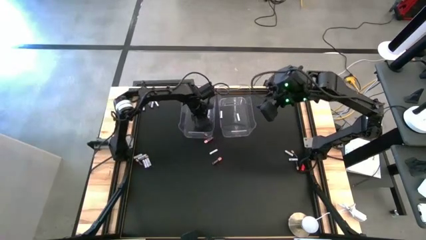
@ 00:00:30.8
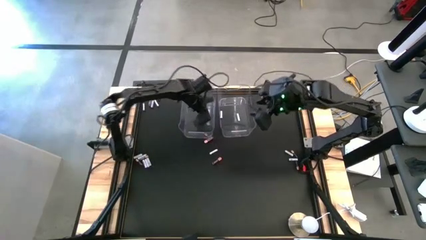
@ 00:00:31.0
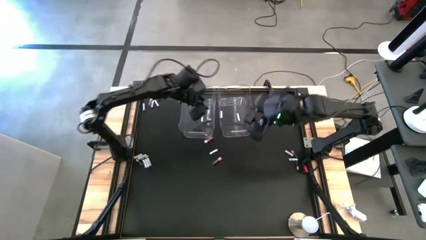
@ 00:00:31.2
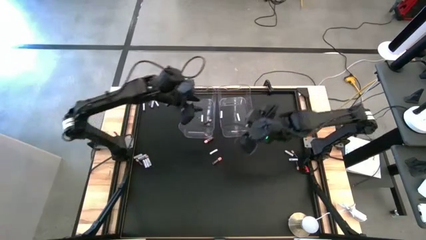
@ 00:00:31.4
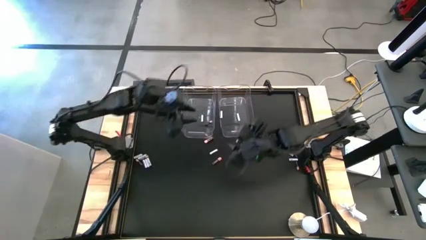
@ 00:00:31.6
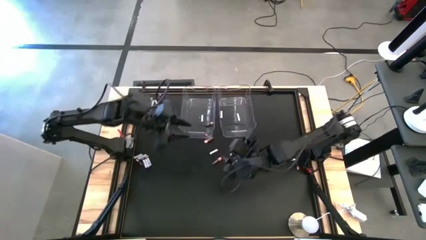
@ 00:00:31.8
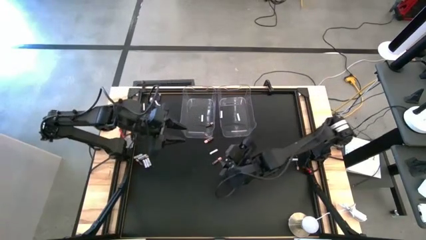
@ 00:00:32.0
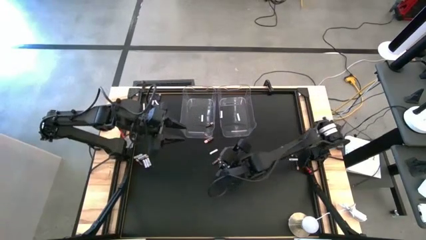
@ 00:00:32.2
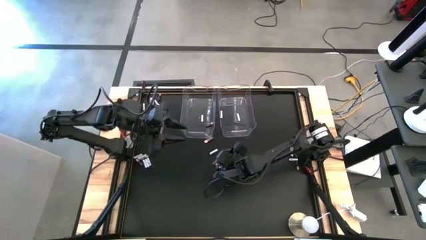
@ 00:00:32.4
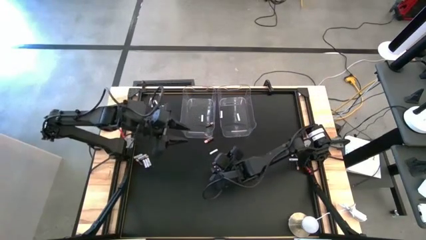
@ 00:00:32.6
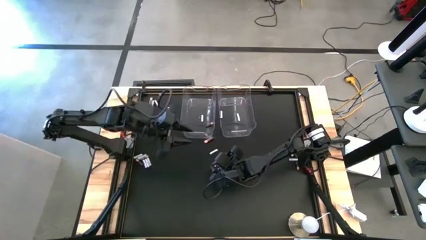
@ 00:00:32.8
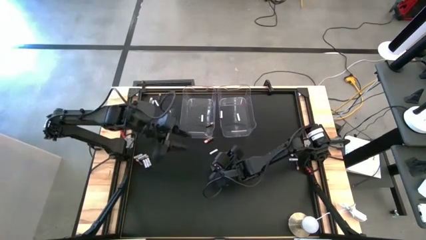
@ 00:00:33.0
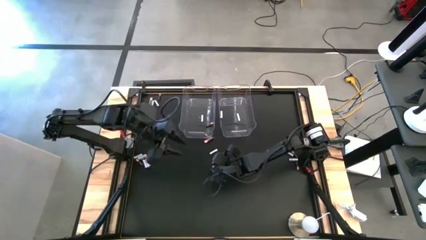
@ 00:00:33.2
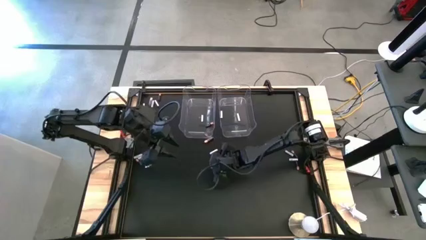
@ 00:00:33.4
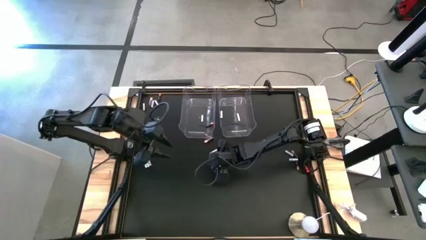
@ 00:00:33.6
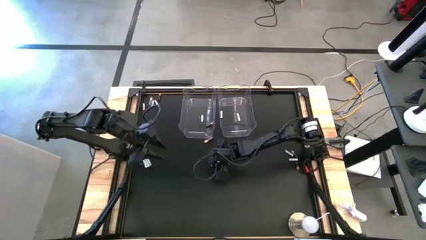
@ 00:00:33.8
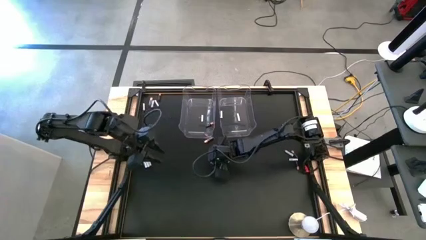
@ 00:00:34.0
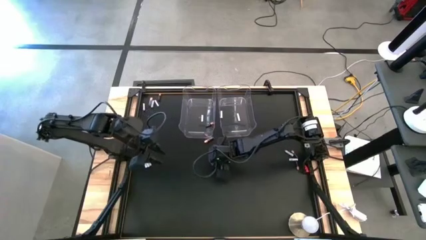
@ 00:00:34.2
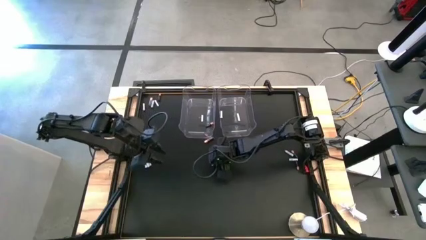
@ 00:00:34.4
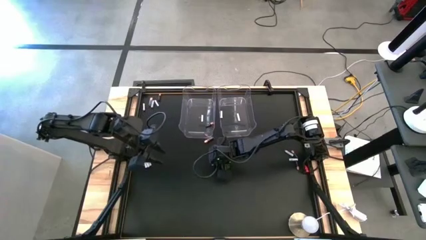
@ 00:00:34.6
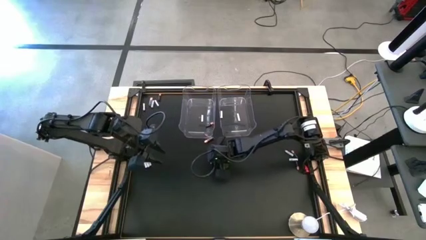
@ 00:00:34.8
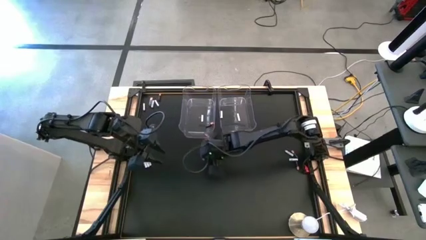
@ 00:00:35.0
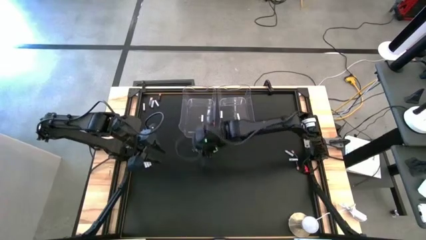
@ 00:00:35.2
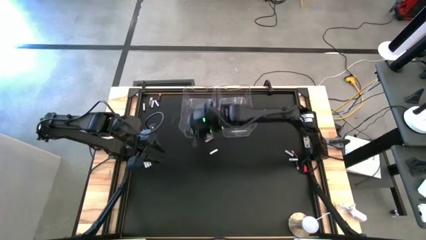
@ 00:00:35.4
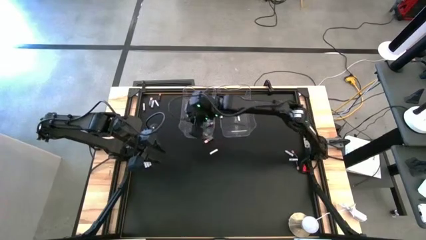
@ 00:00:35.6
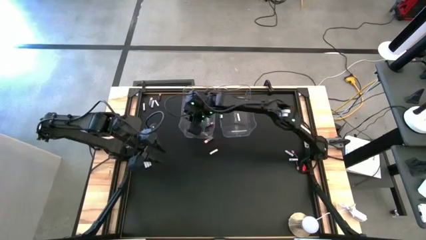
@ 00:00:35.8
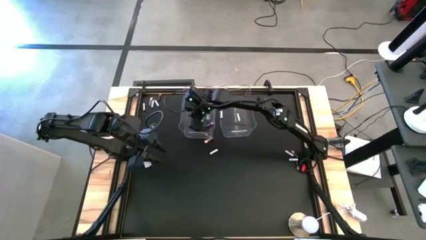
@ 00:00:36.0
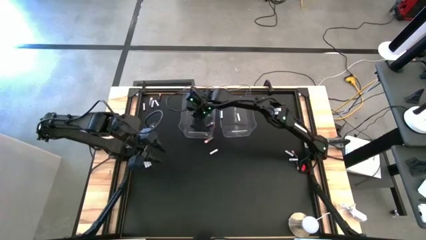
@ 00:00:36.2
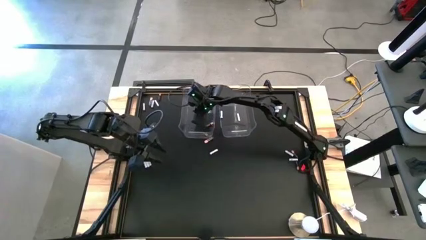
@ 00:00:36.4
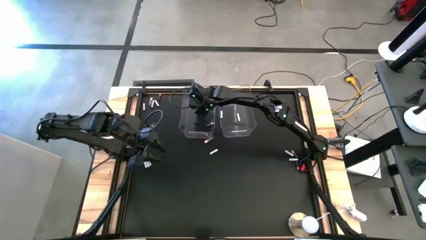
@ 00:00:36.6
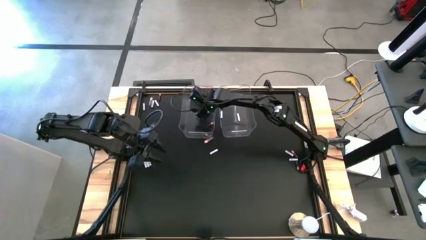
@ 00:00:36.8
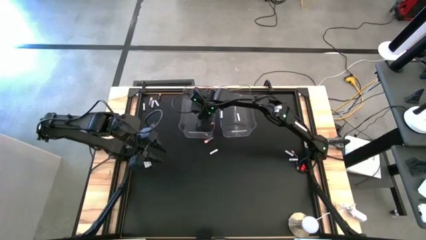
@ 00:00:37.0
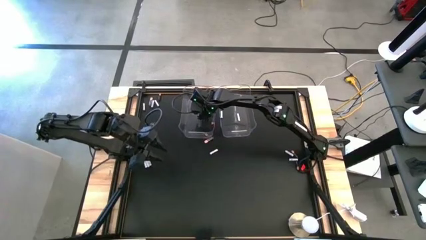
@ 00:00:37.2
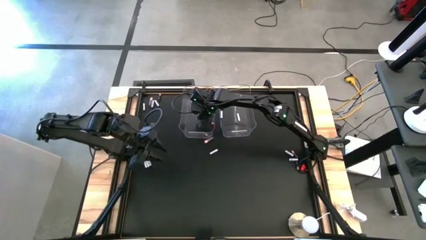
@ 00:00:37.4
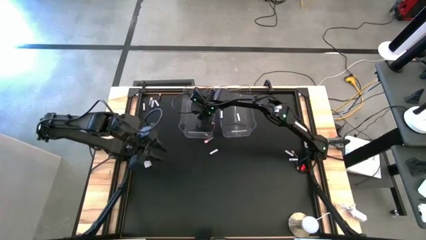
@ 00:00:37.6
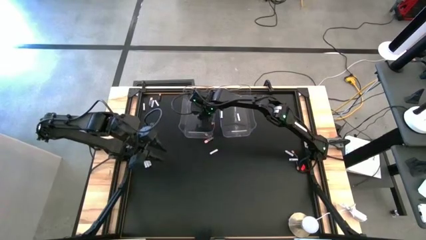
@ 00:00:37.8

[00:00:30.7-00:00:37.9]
Task: Sort batteries
Put the black battery into the left transparent bin

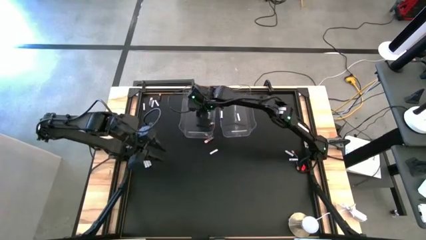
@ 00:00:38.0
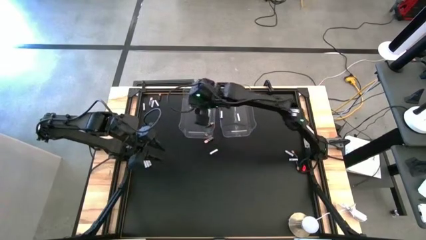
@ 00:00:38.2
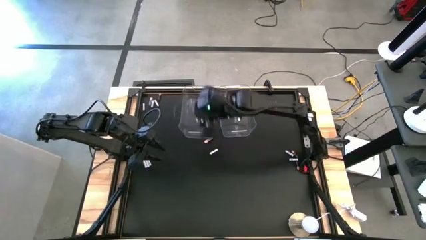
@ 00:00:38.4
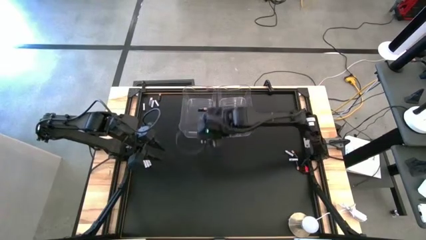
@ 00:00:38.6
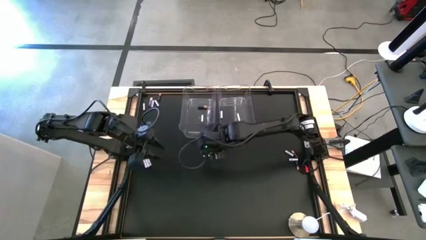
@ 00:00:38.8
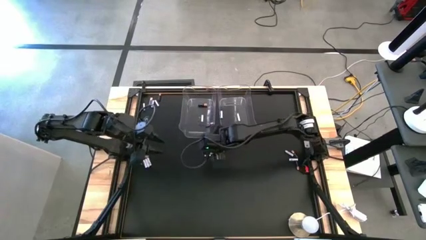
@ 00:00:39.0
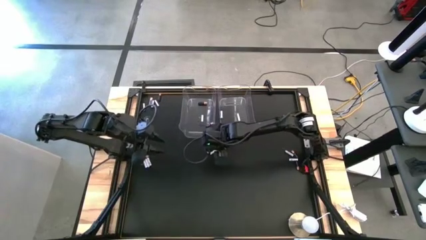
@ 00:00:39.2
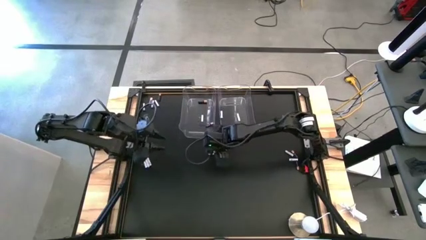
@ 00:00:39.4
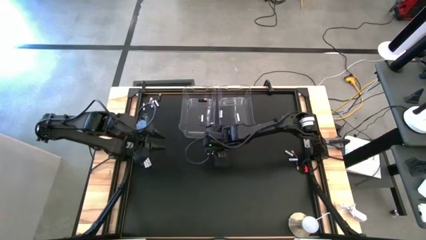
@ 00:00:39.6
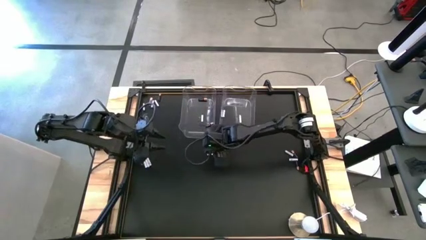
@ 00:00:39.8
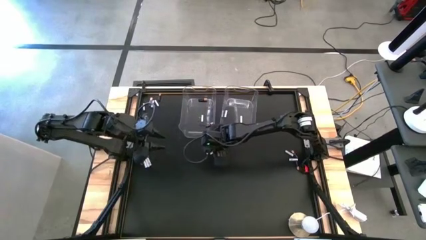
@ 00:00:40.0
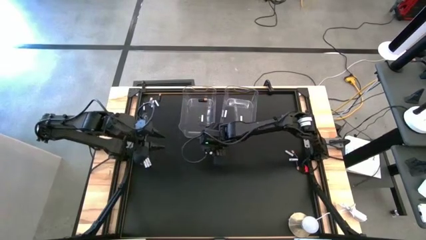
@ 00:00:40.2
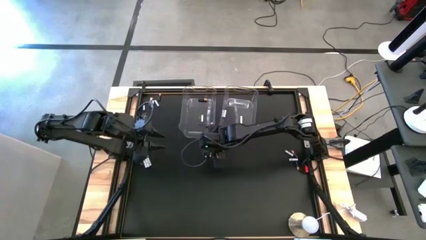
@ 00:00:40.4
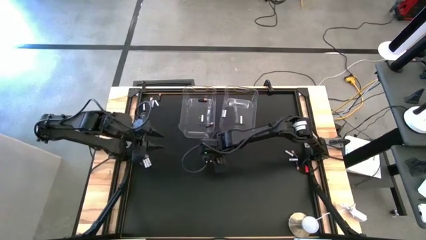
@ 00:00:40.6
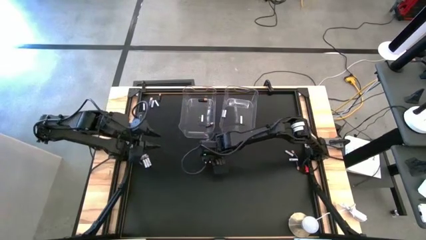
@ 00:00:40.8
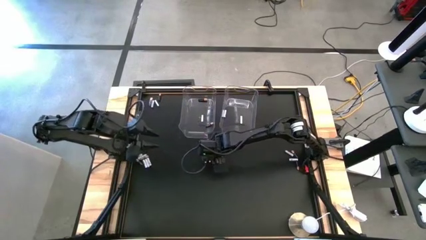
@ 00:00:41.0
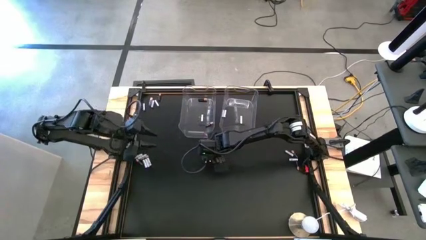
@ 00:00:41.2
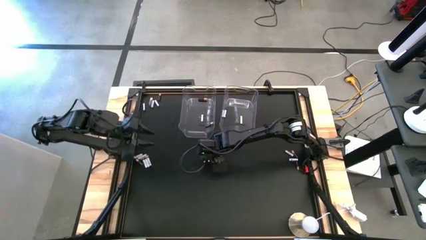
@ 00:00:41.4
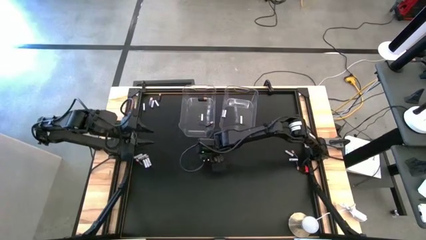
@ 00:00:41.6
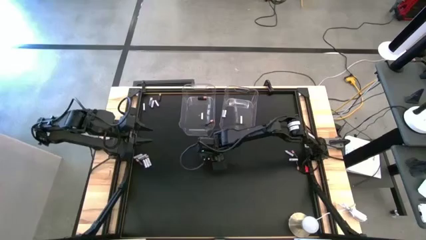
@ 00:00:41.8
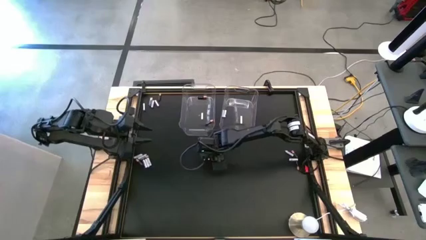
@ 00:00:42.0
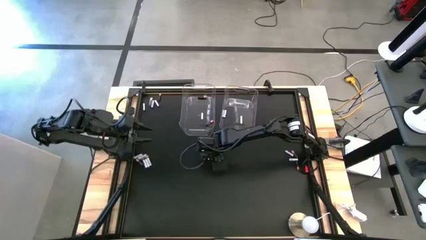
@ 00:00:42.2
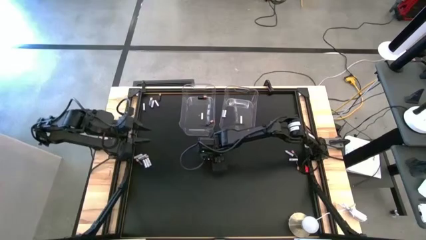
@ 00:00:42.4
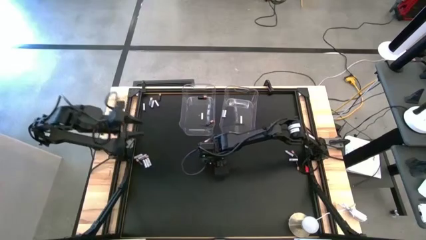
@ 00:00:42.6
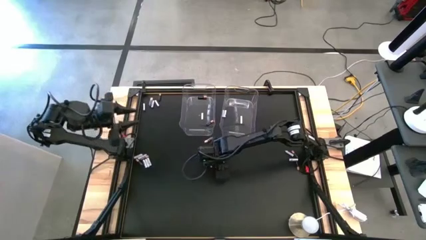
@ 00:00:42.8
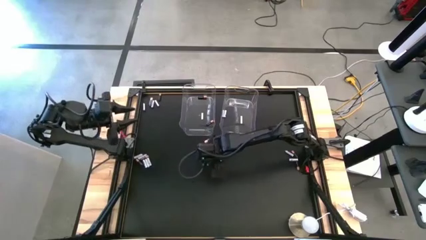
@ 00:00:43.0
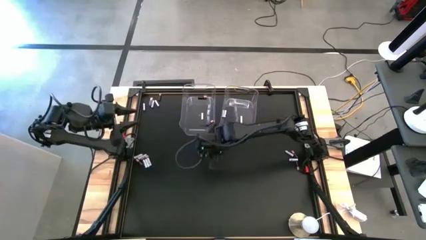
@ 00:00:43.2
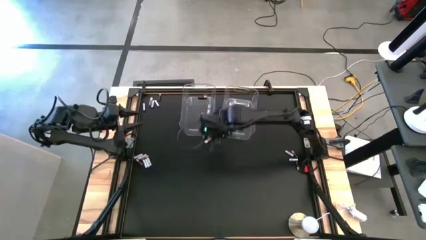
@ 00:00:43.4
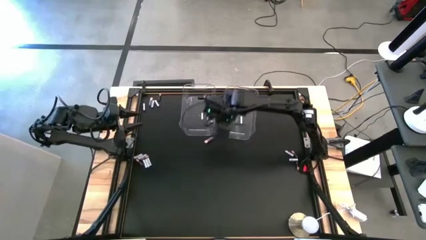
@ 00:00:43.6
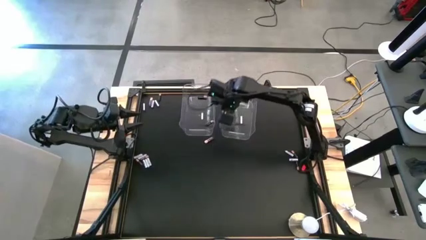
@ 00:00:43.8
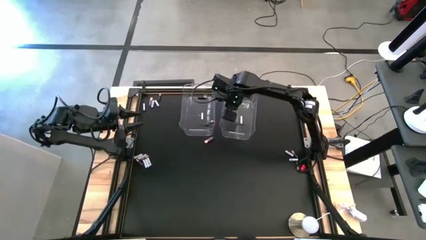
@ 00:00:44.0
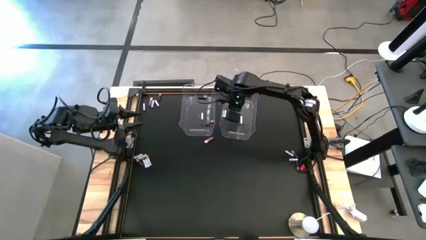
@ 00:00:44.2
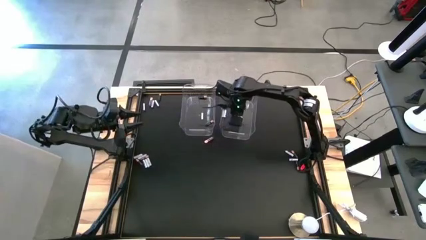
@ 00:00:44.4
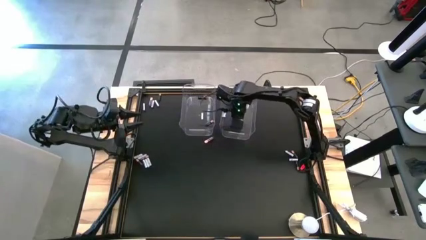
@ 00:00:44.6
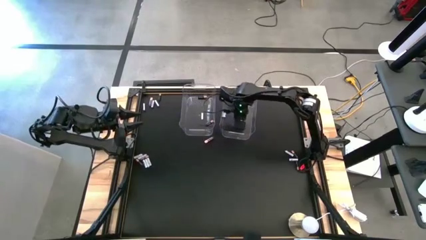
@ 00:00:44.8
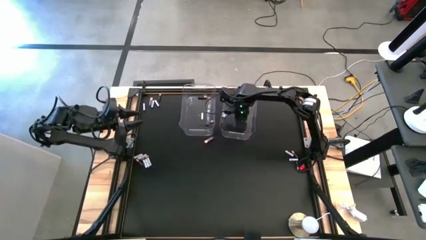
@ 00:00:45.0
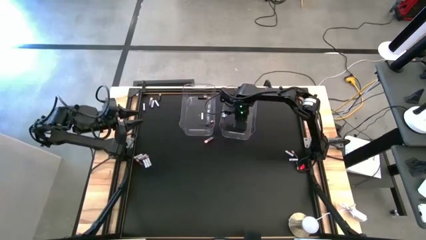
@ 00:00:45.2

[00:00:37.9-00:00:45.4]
Put the white battery into the right transparent bin

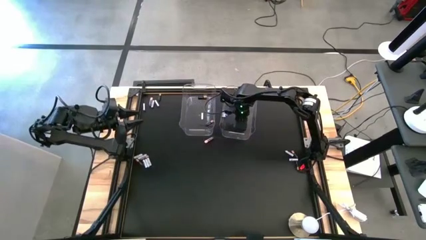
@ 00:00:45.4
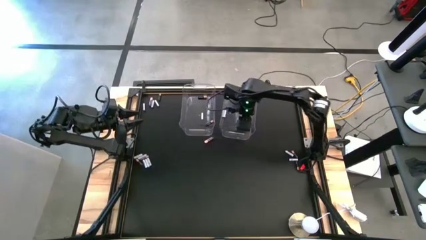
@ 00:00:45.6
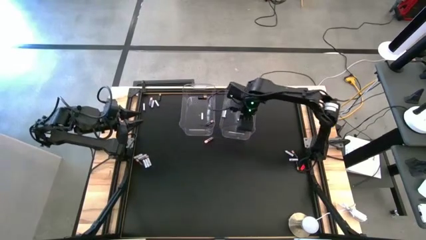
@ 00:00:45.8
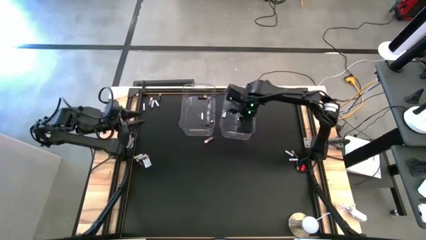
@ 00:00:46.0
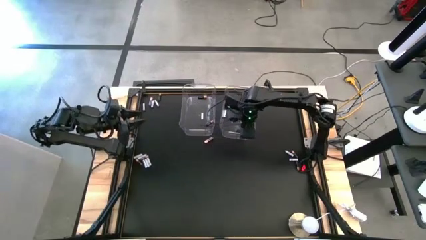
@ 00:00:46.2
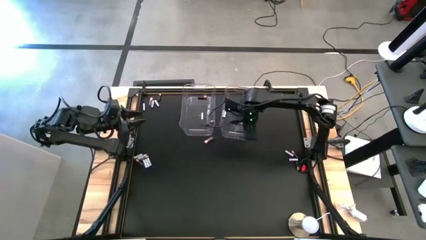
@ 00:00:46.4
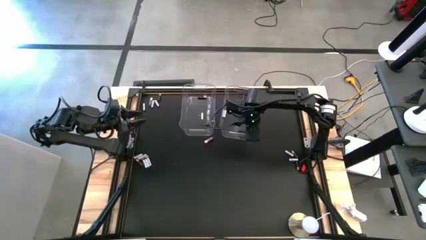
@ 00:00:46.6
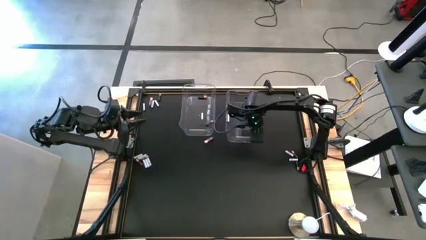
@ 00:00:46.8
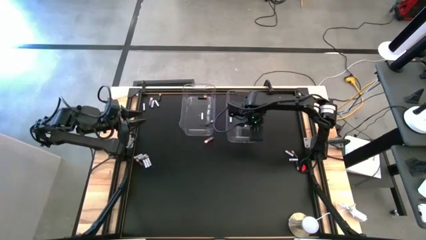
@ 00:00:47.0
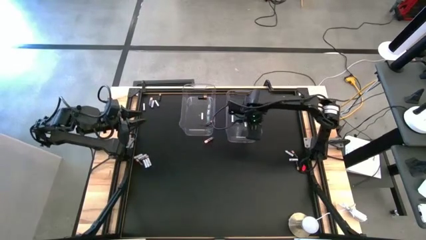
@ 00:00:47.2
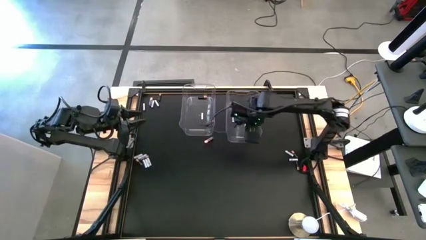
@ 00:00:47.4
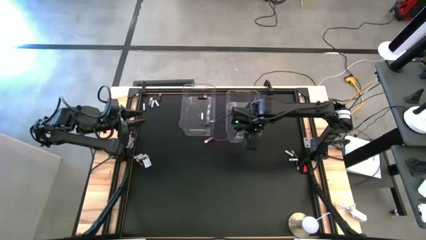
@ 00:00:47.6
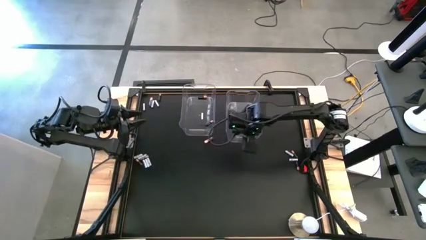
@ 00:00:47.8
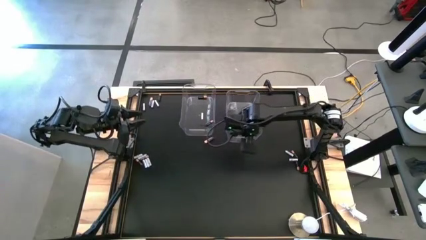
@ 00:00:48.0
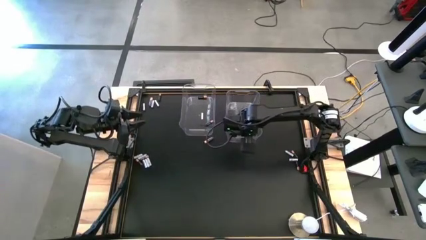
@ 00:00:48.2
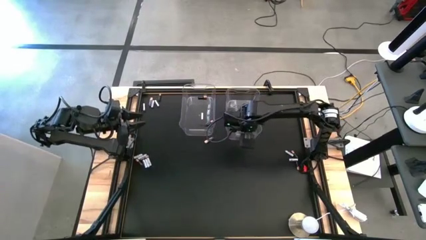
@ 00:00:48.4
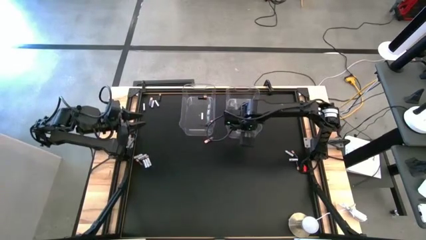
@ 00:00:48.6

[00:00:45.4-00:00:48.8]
Adjust the right transparent bin
